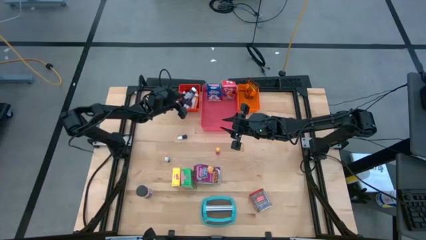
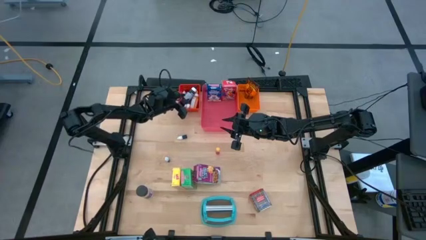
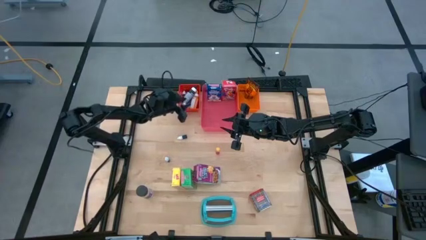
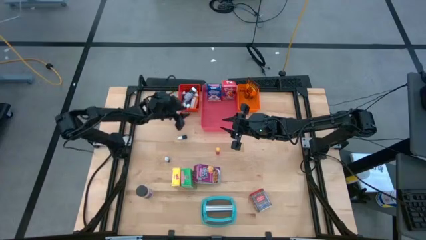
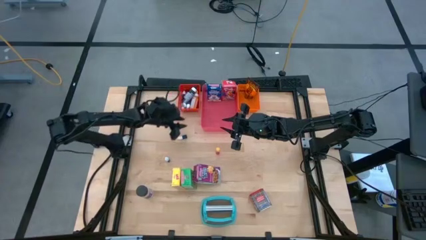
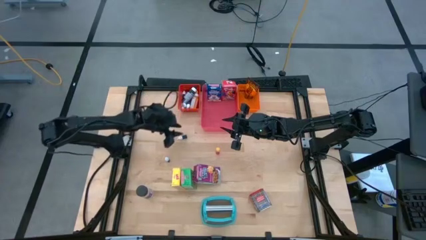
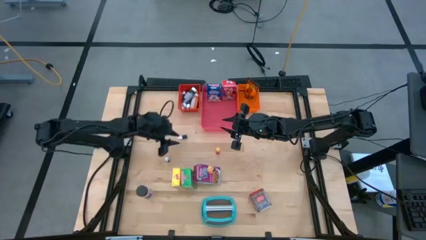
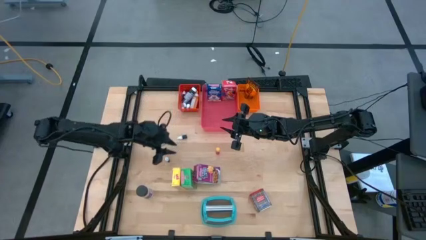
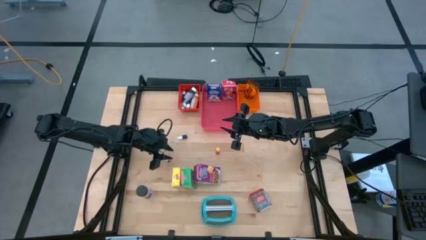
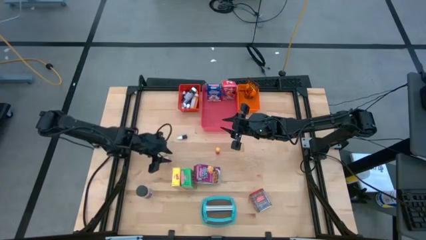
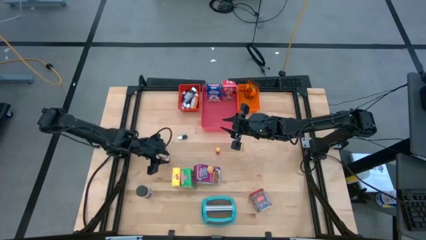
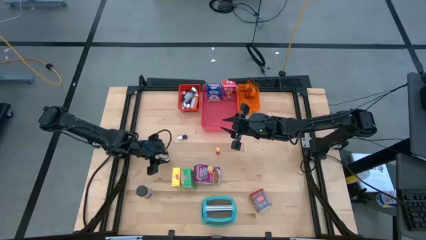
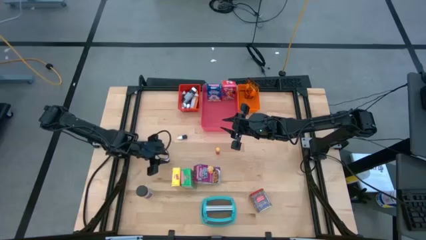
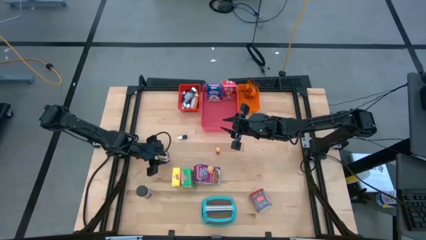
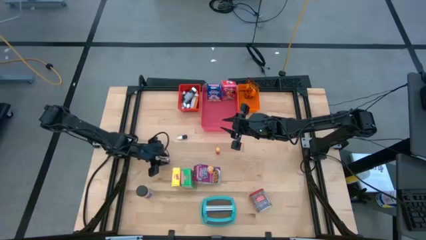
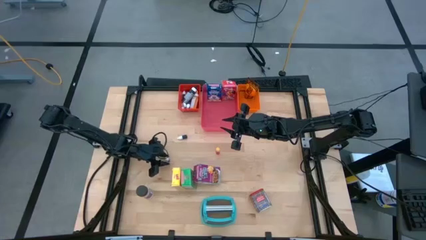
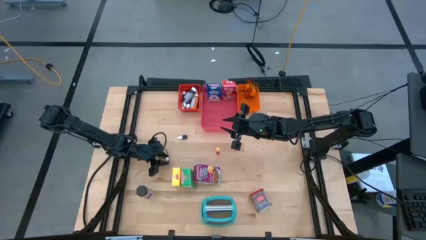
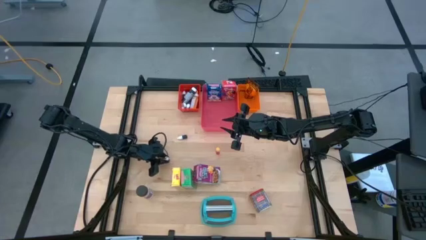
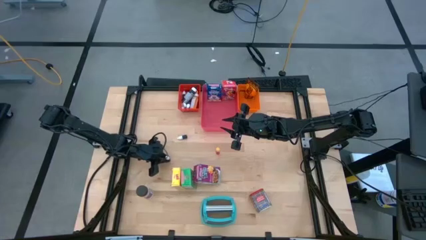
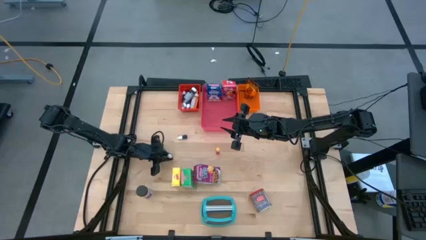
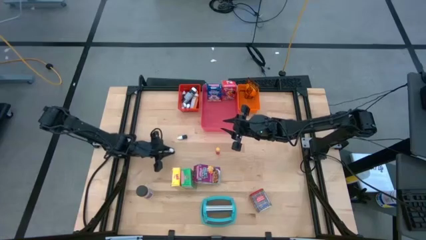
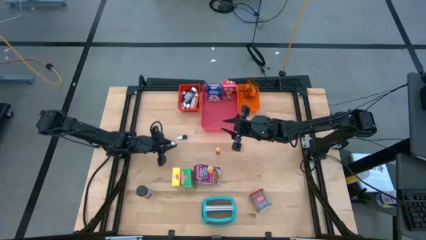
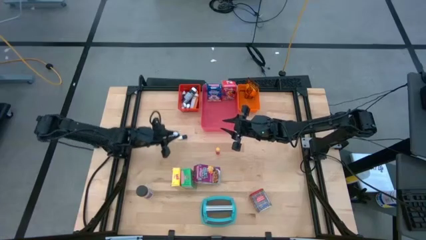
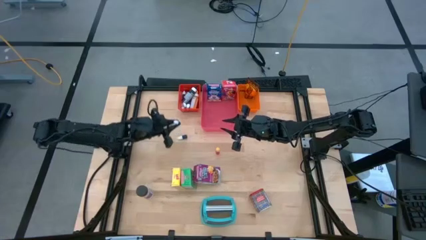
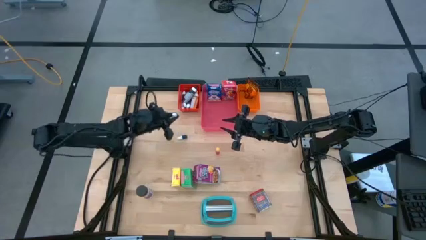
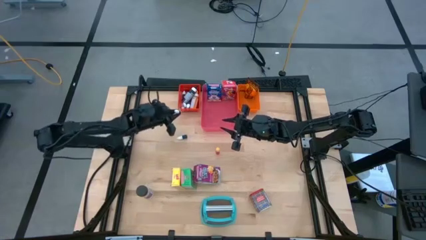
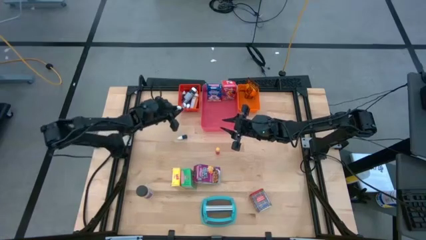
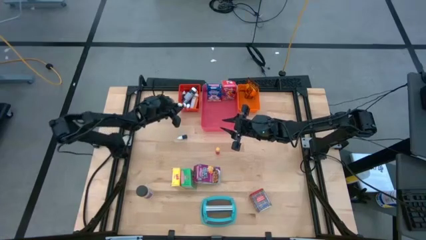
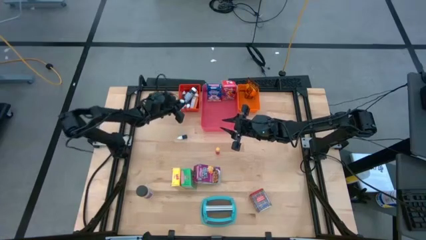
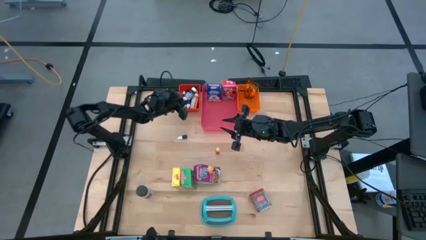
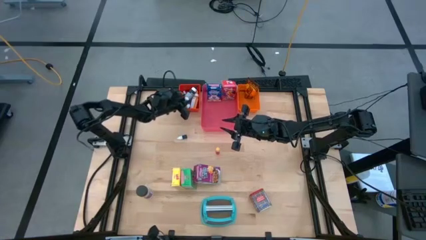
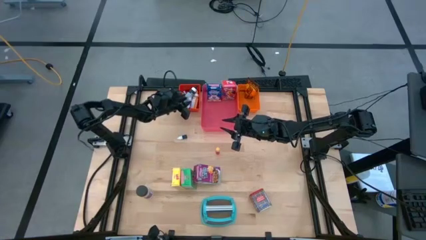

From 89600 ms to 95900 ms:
Task: Pick & Place Kitchen Items
Put the small purple food coloring bottle into the red bin

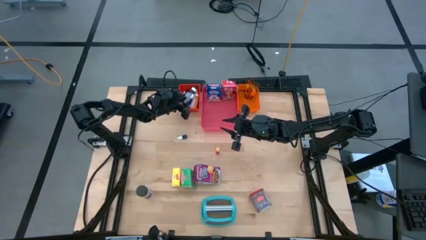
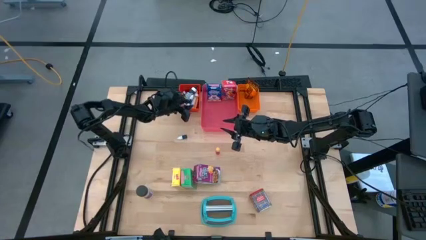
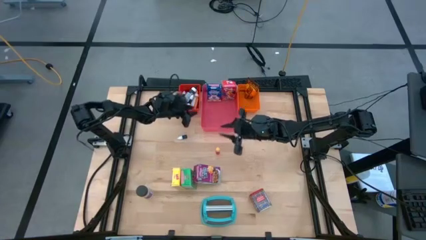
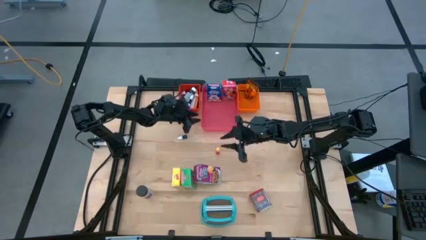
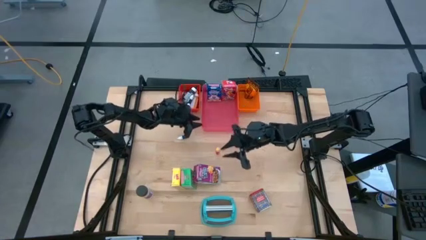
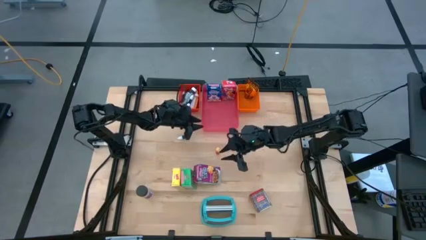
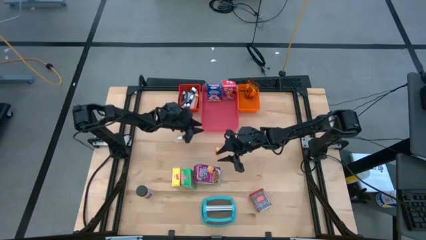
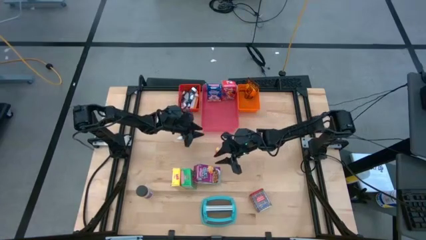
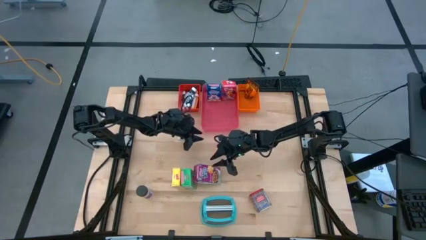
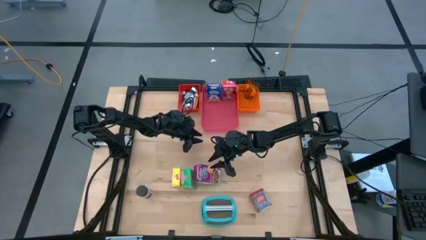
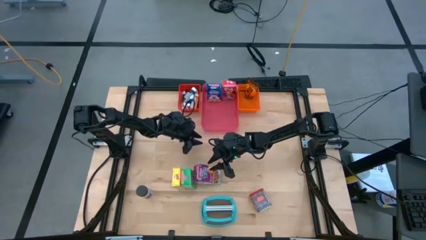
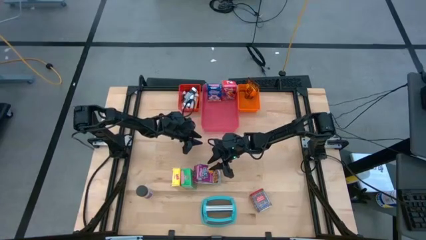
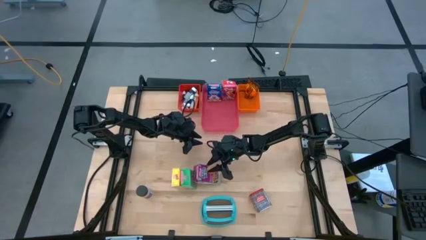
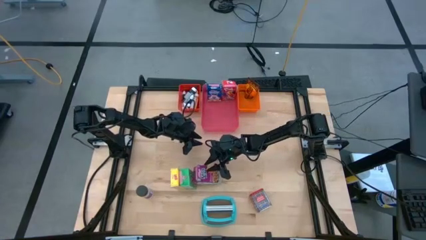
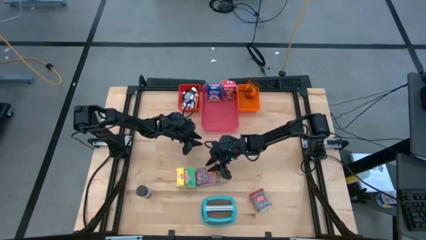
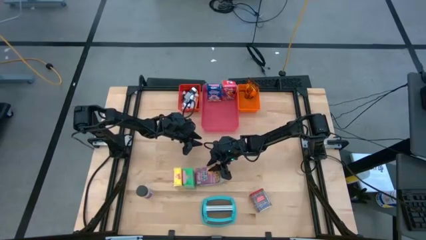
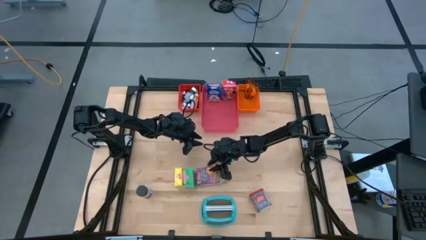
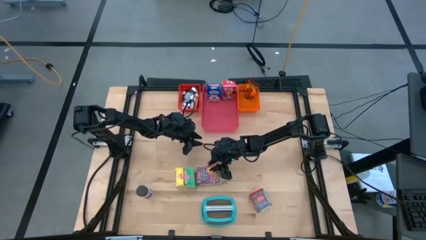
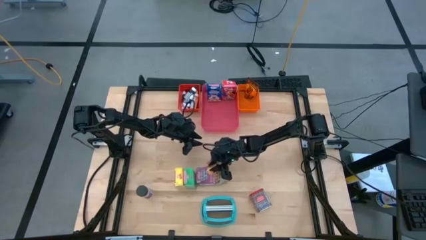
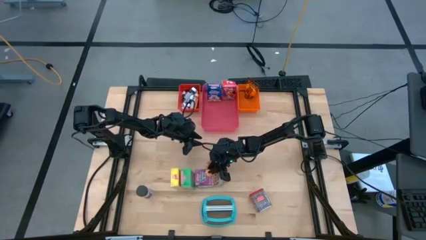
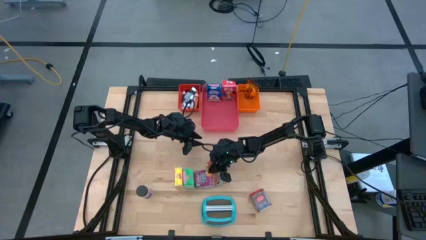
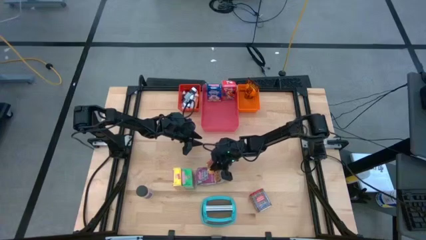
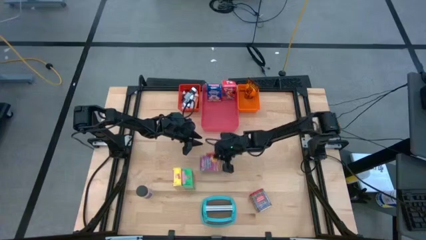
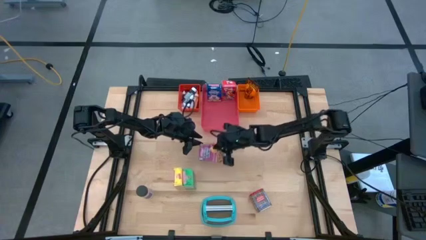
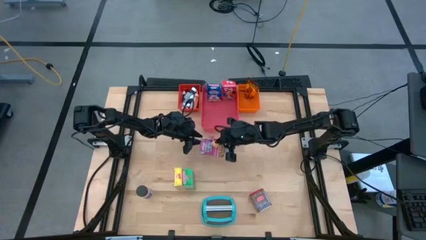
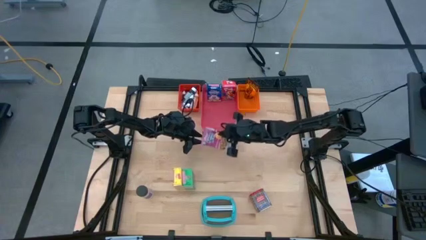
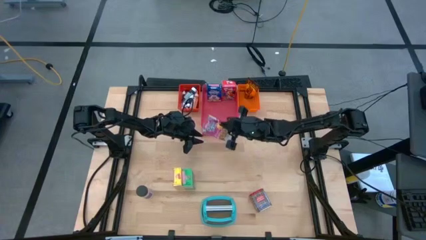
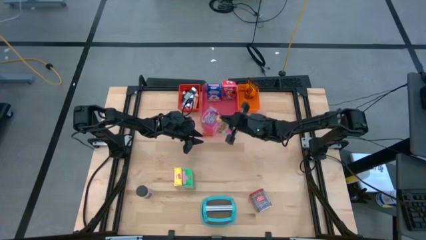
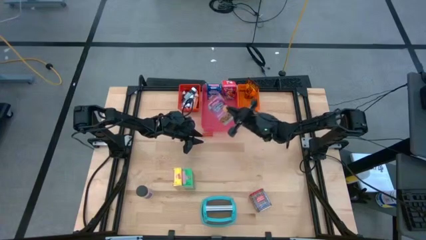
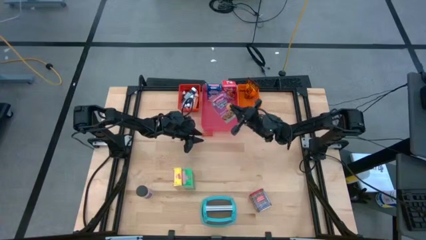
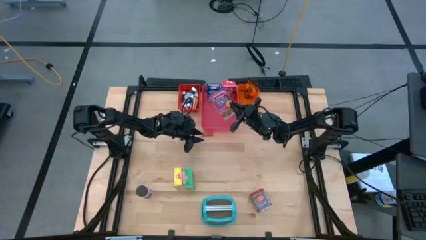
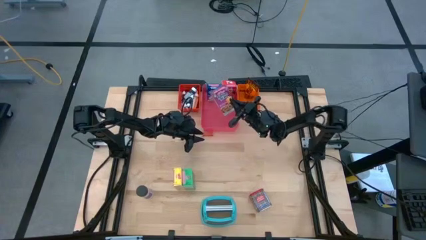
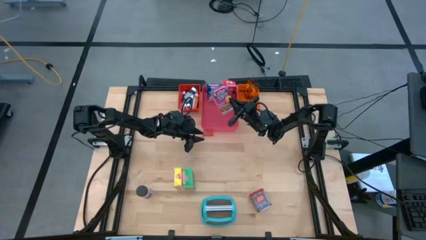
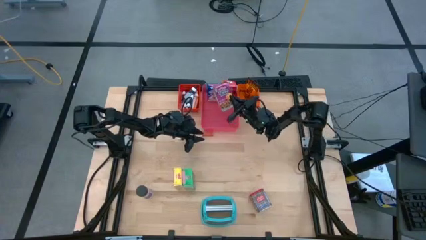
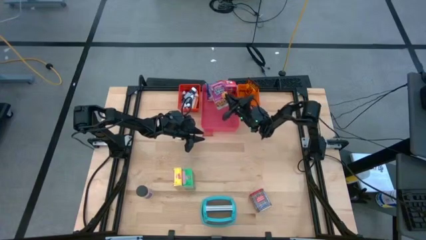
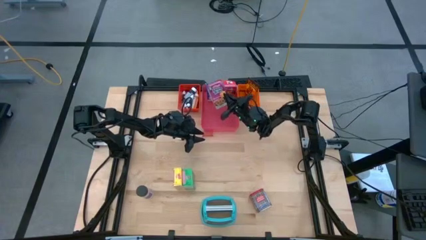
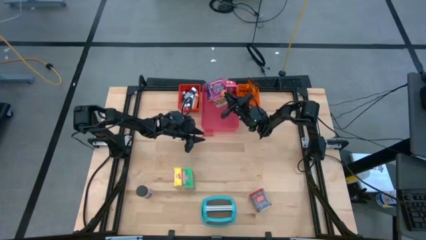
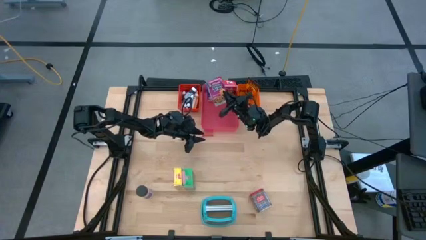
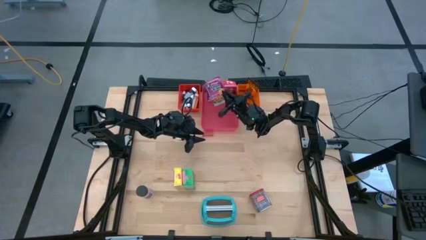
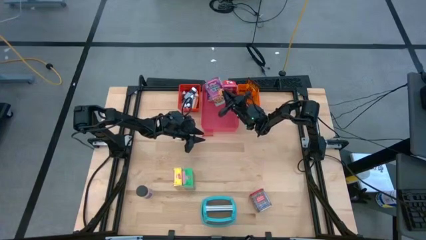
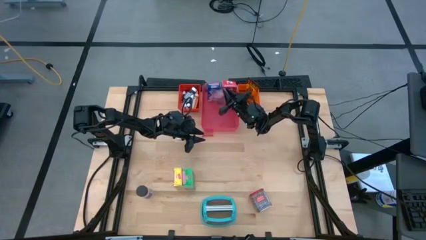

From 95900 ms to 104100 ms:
Put the purple cereal box into the pink bin

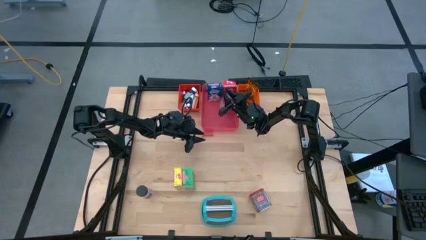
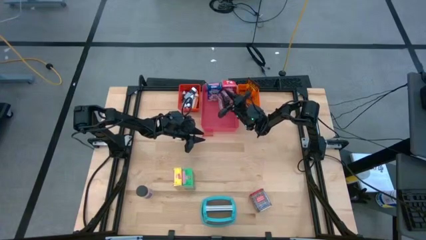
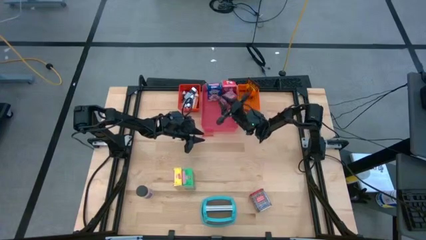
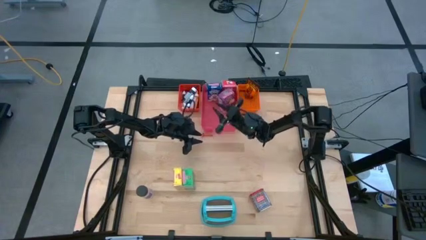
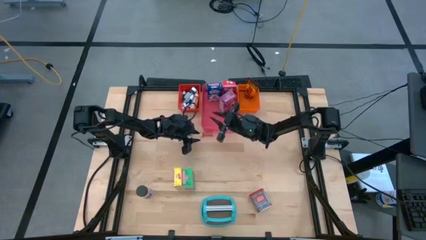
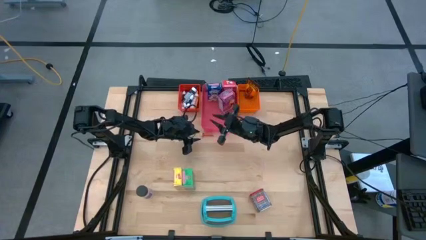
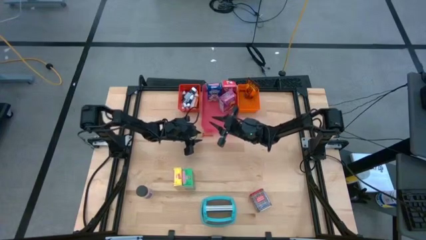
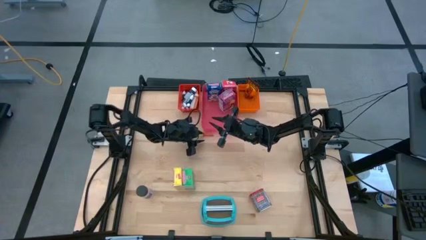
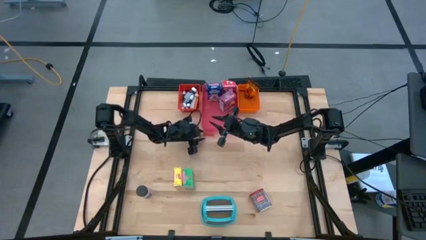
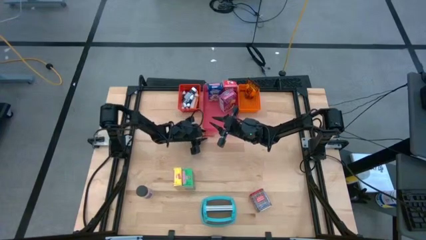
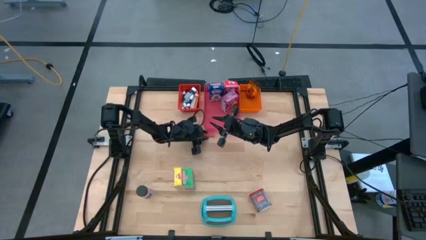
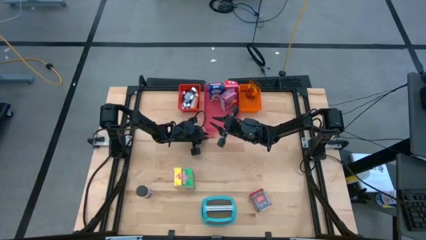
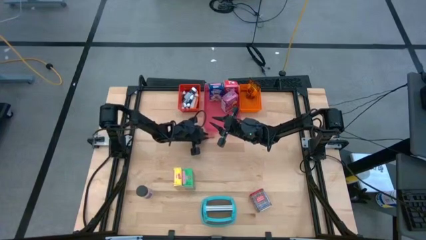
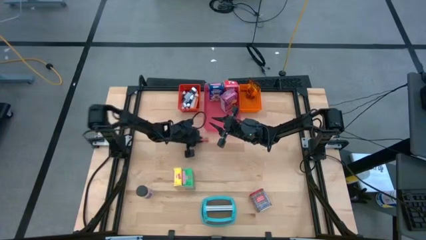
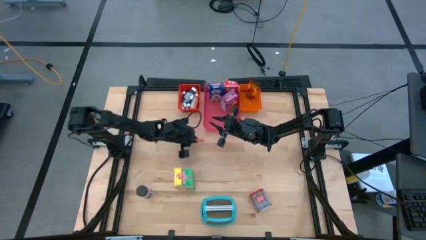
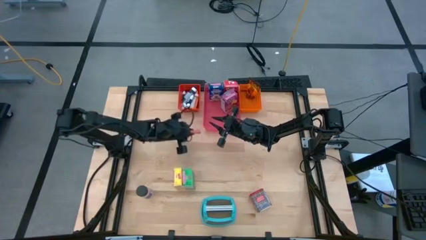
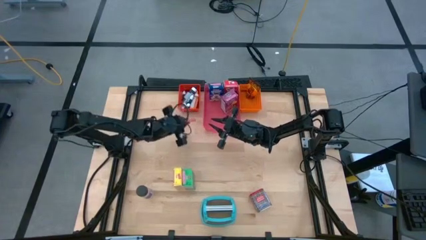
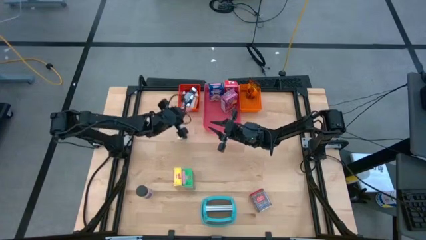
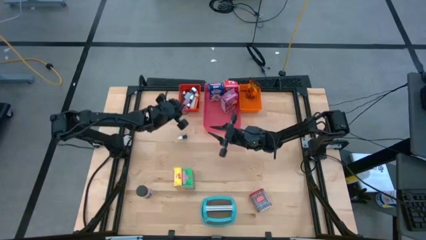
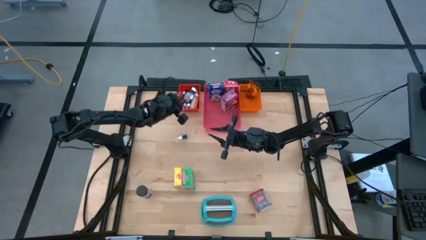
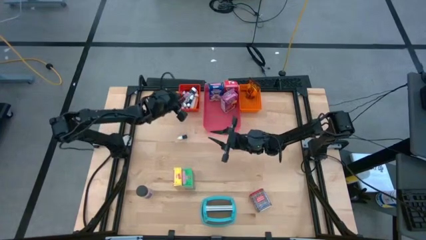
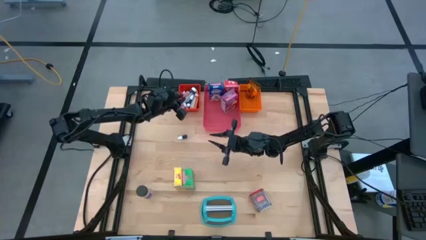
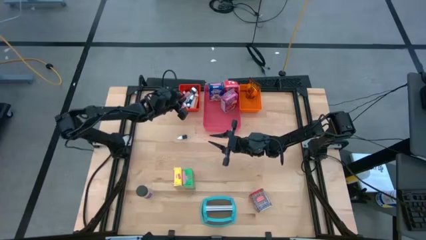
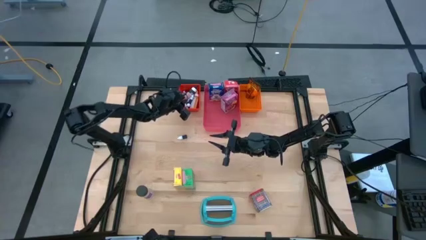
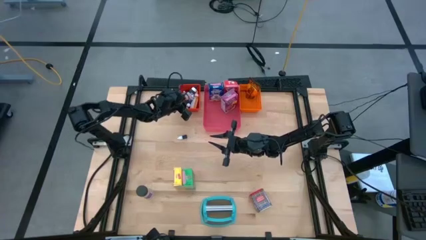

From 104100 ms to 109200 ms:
Put the small red food coloring bottle into the red bin
